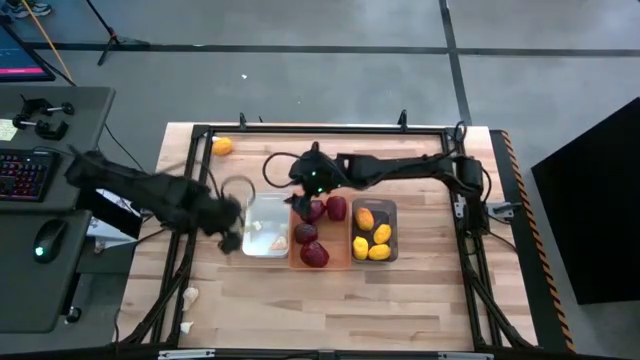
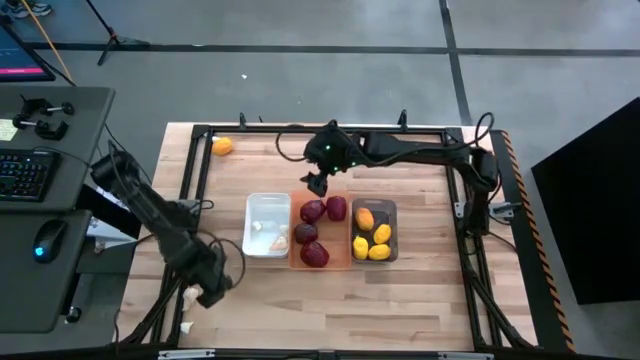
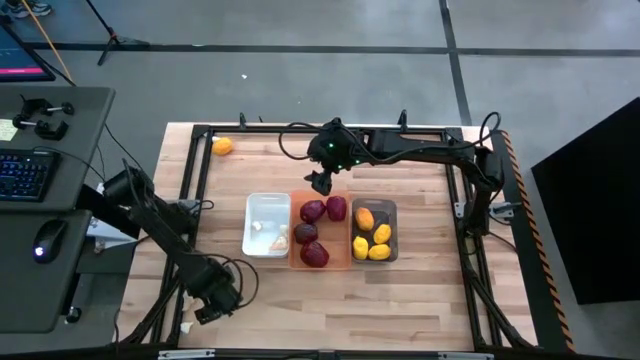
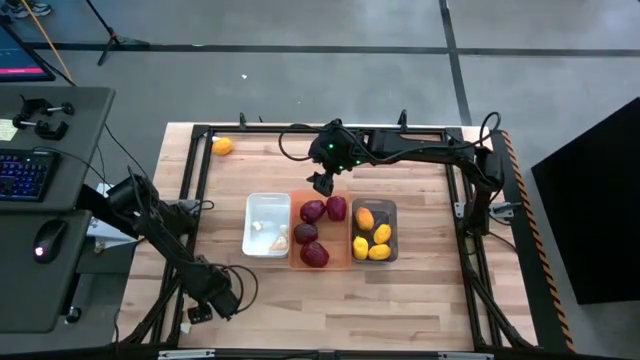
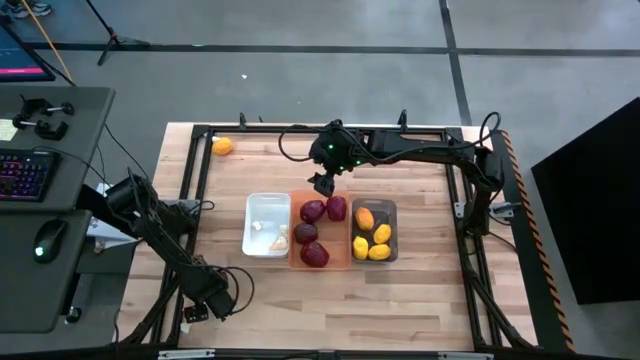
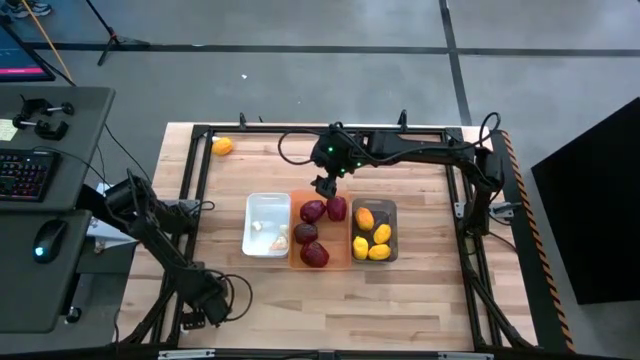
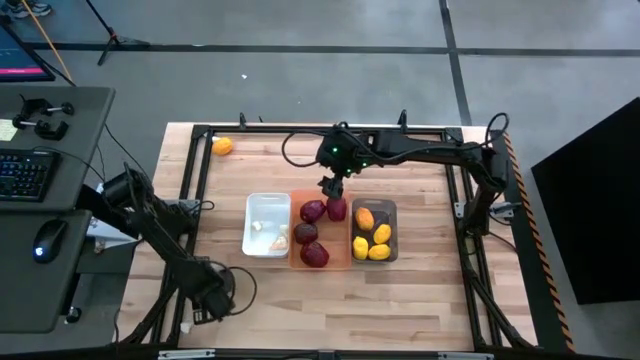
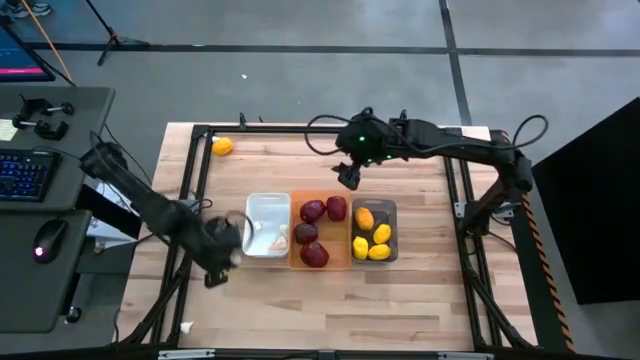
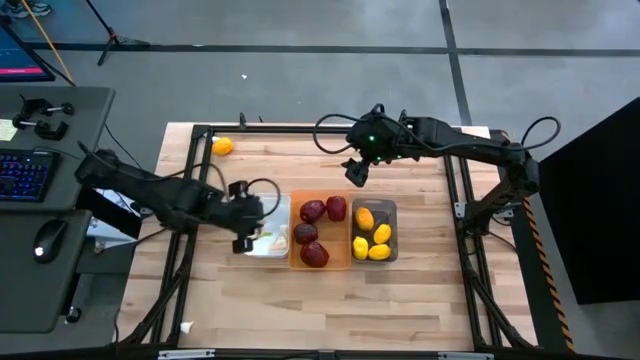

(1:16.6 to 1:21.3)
Task: Sort produce into baskets
Put the white garlic into the white bin

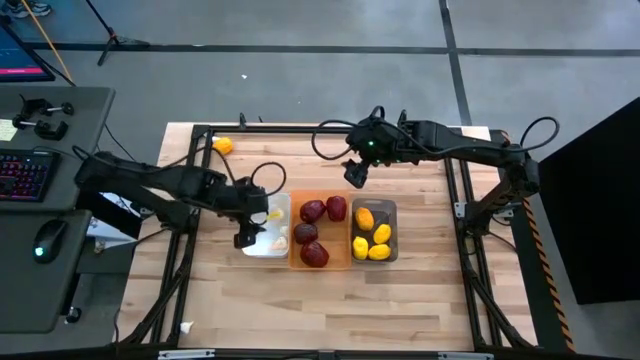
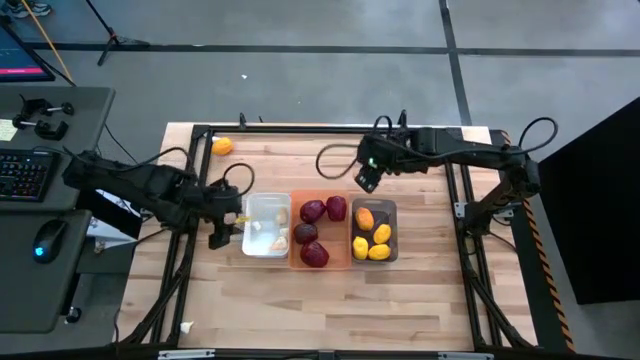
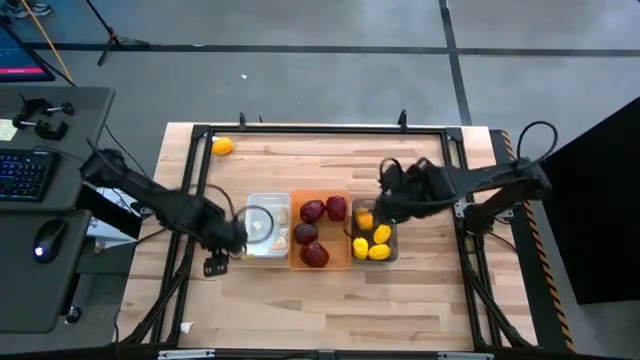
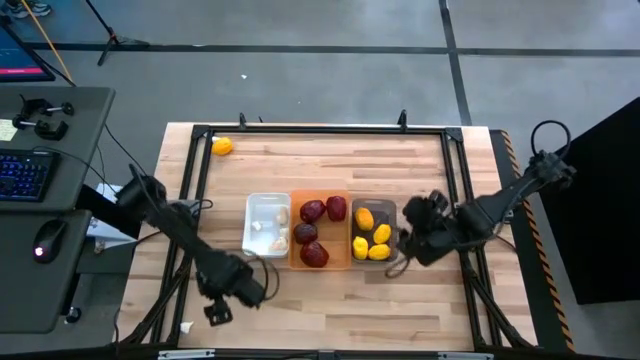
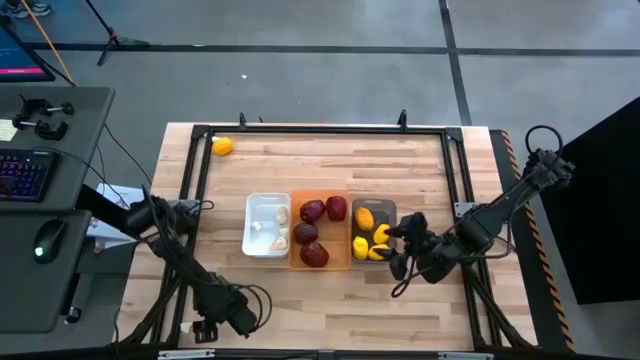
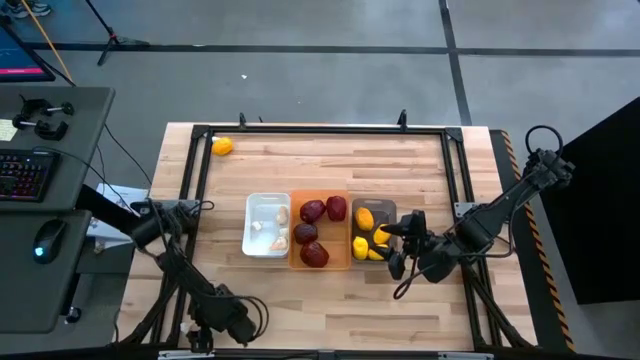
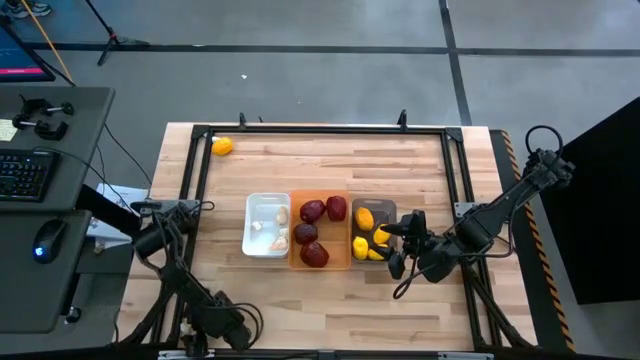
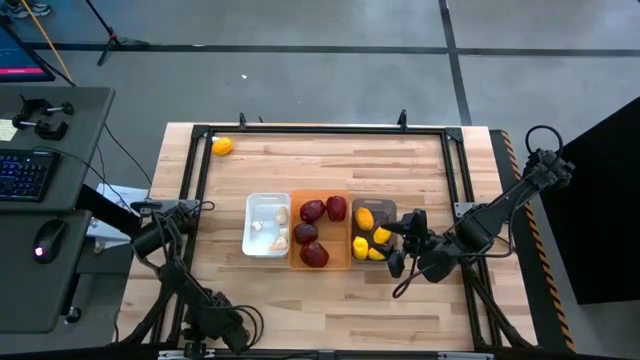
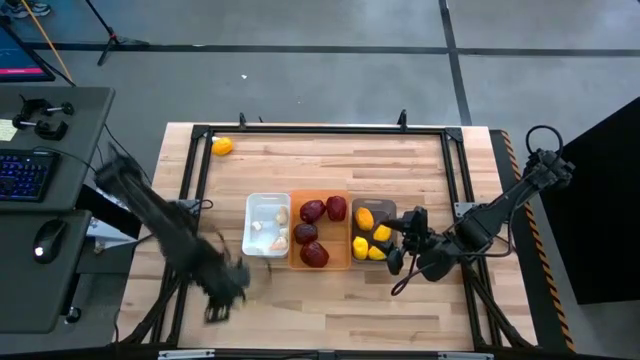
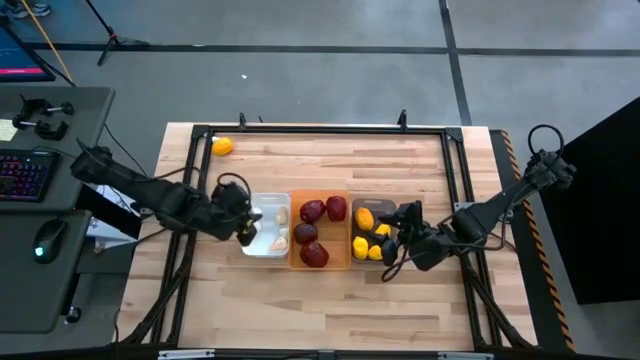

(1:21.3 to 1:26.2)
Put the white garlic into the white bin

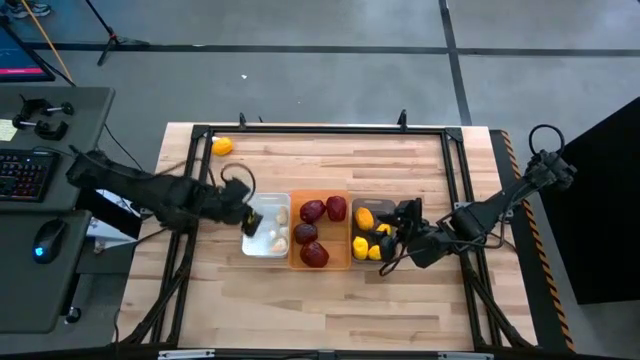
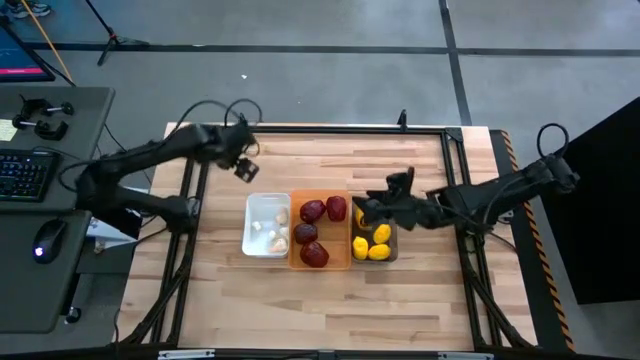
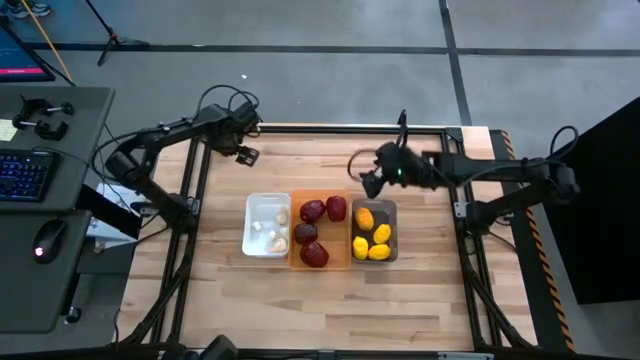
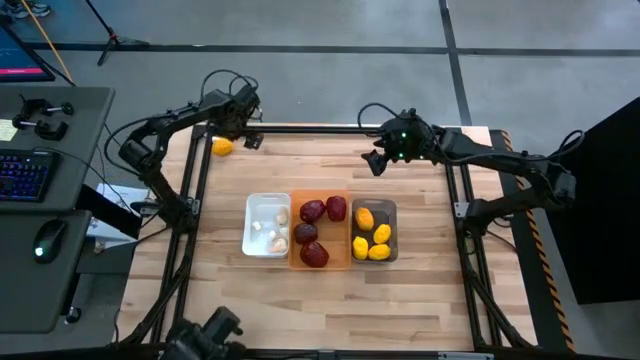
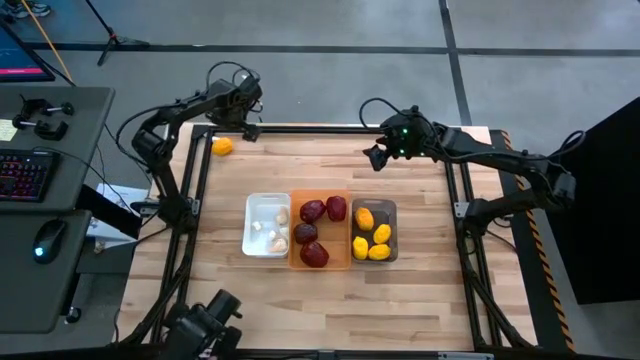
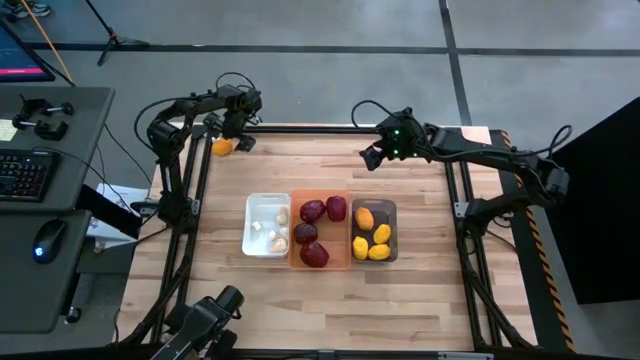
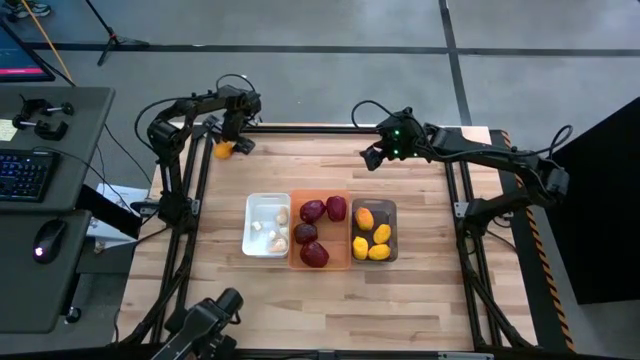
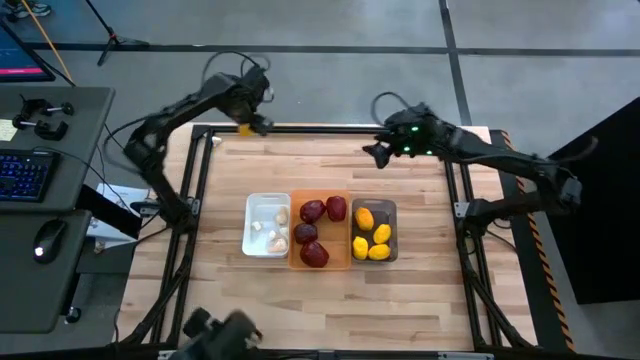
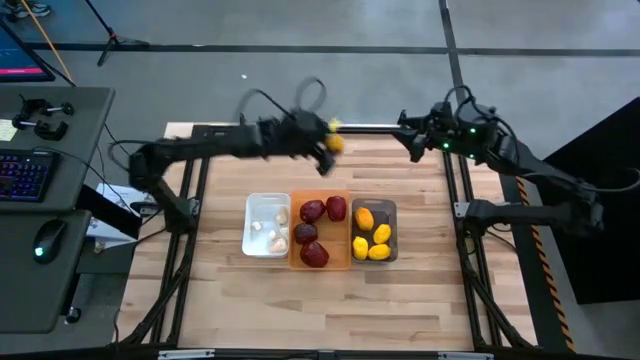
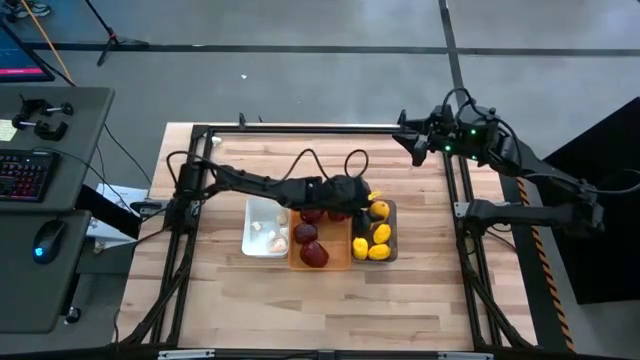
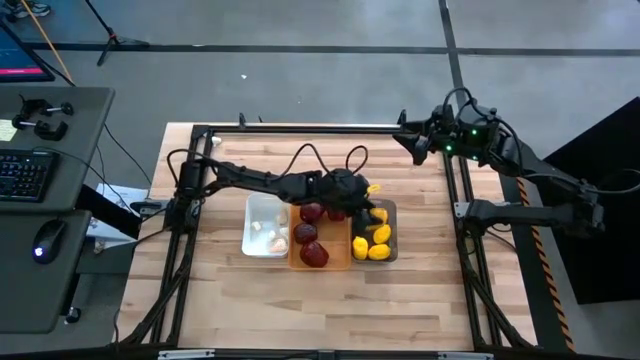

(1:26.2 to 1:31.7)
Put the yellow lemon into the black bin

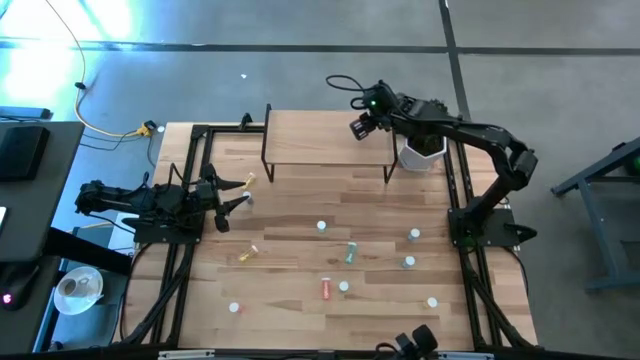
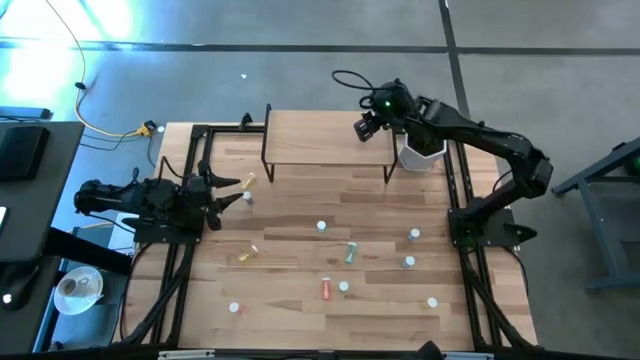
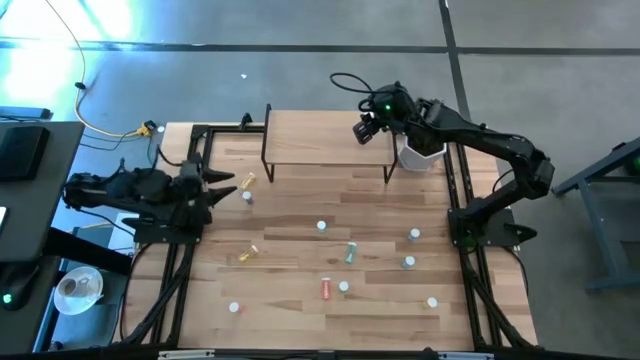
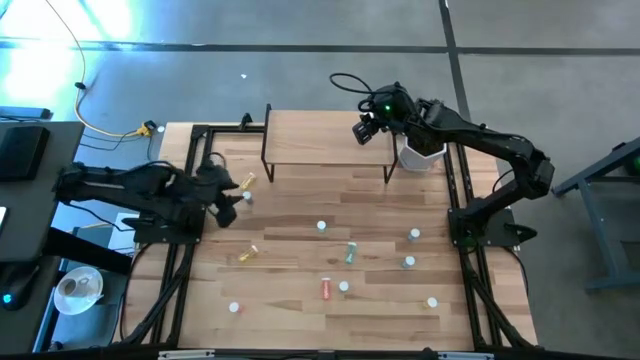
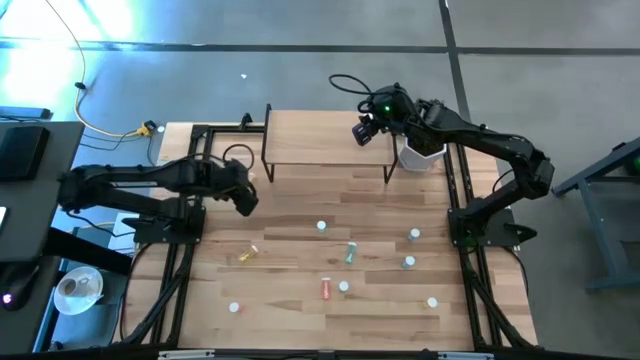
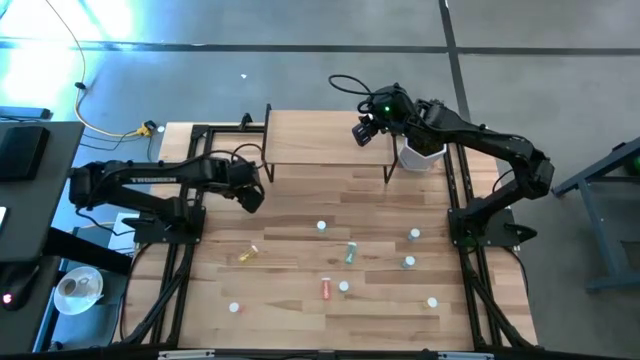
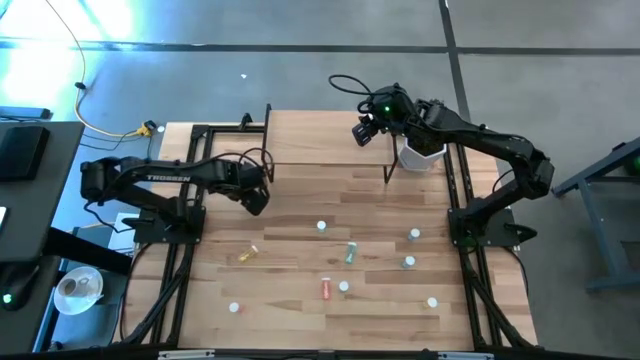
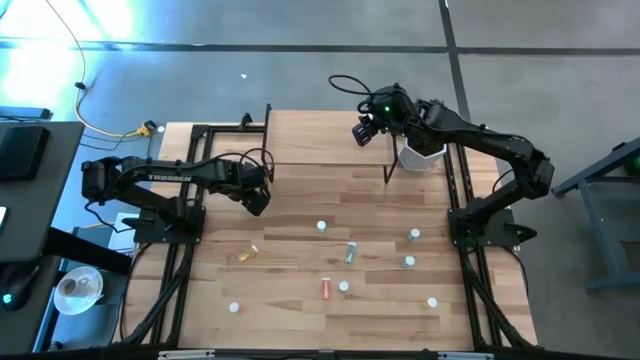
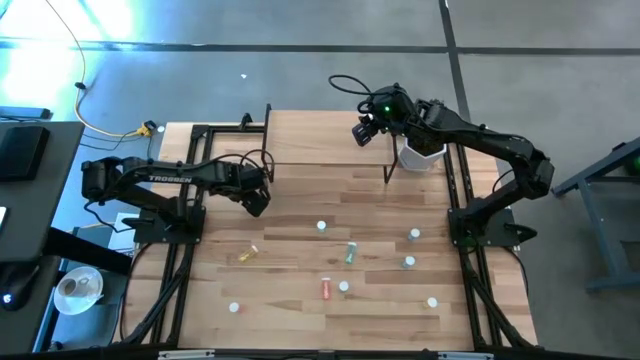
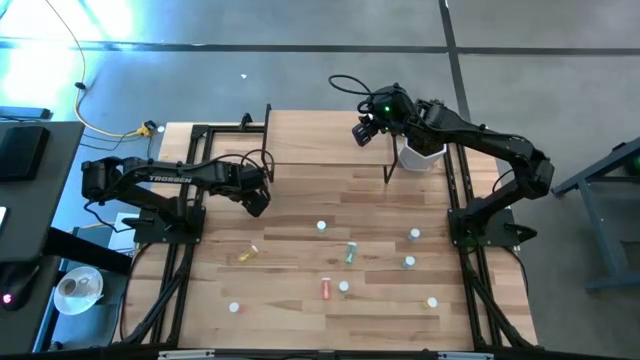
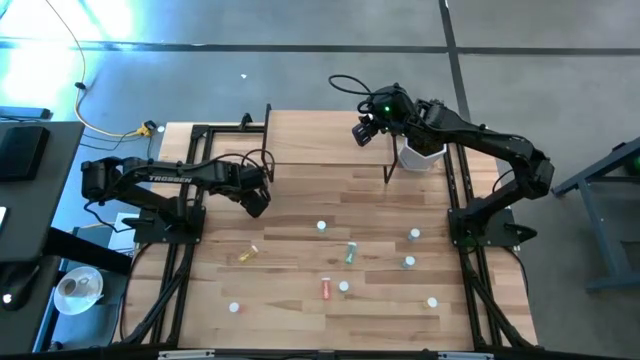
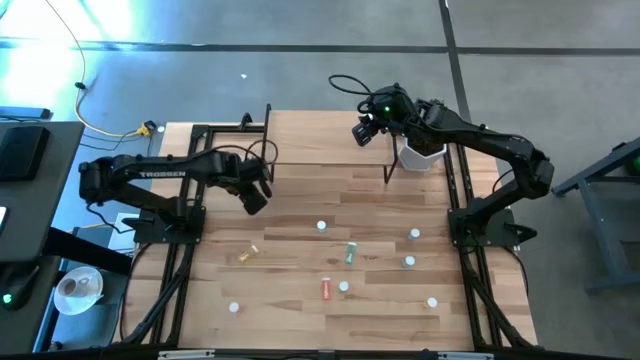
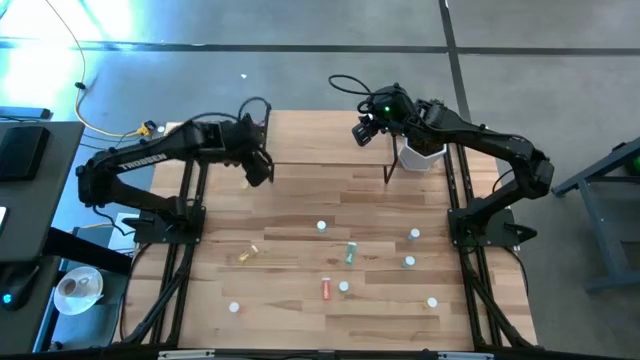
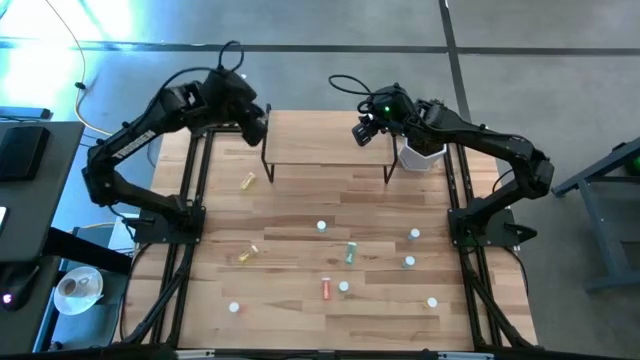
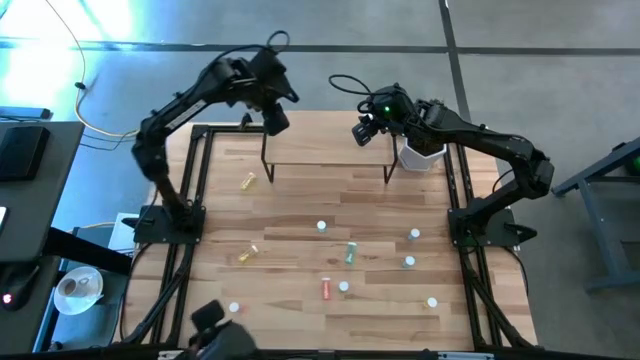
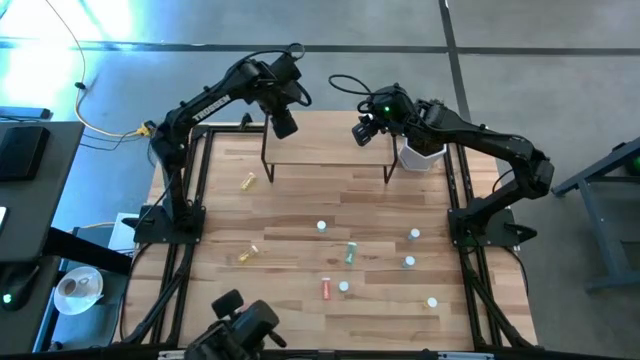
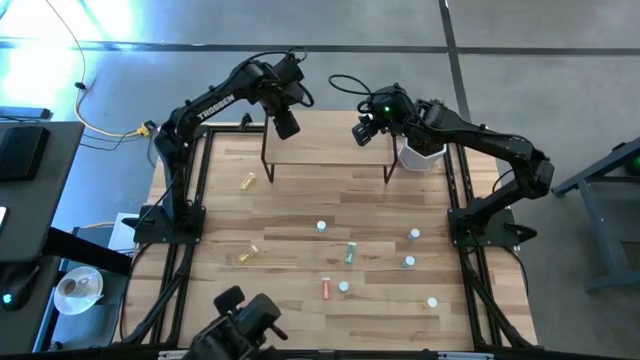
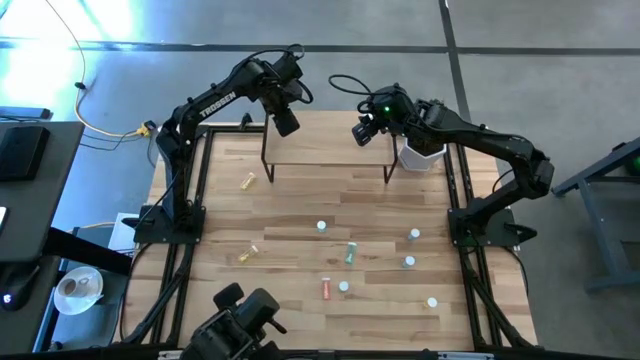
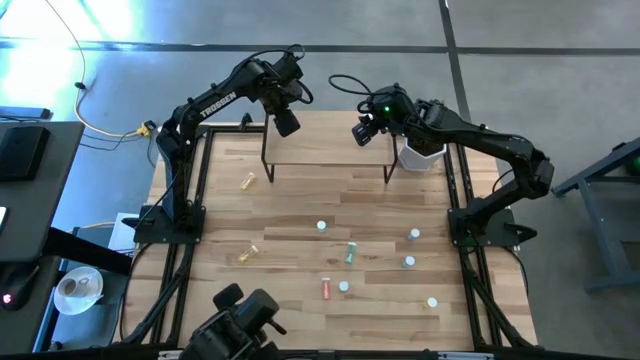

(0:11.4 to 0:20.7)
Task: Pick and place medicine bottles onto shelf by color
Put the blue pill bottle on the shelf
